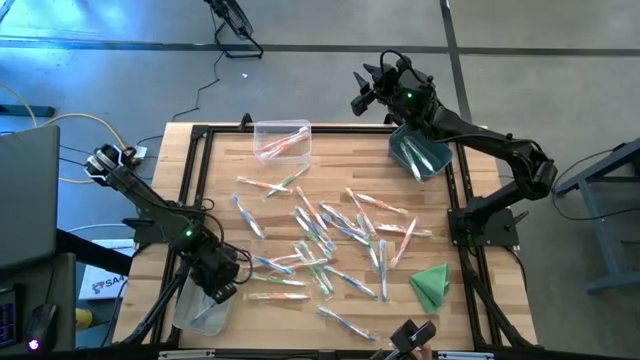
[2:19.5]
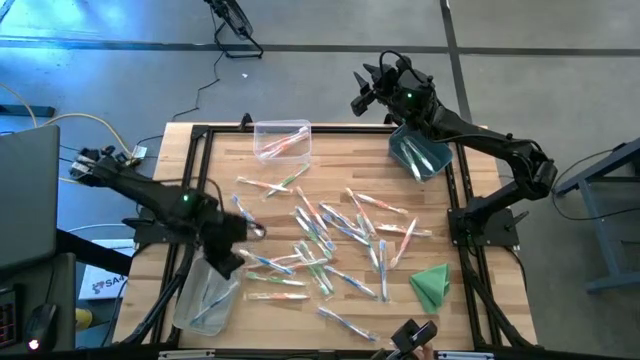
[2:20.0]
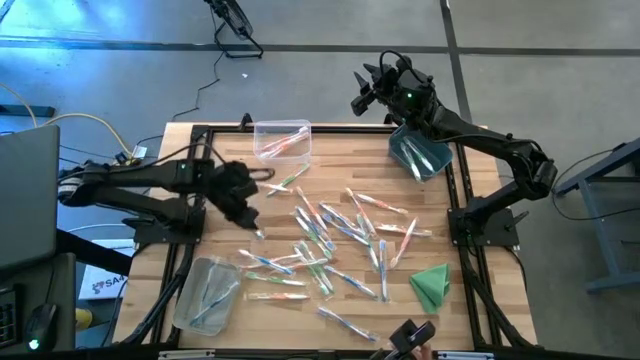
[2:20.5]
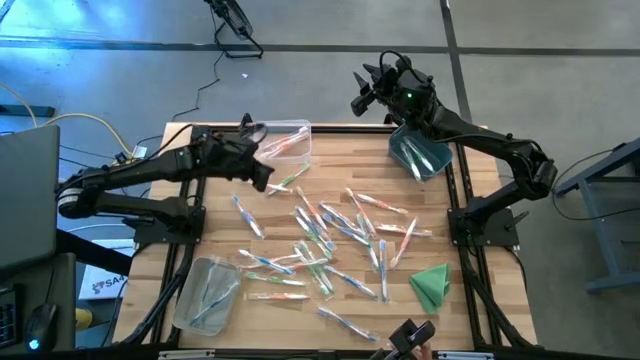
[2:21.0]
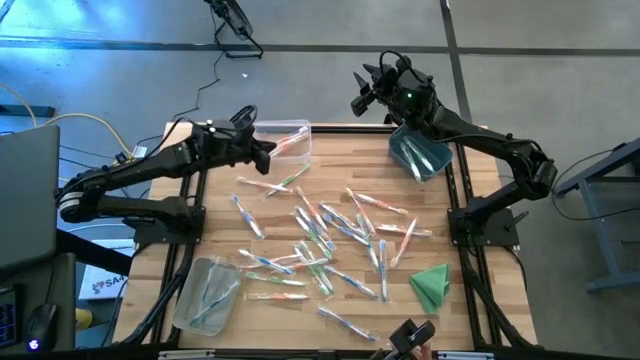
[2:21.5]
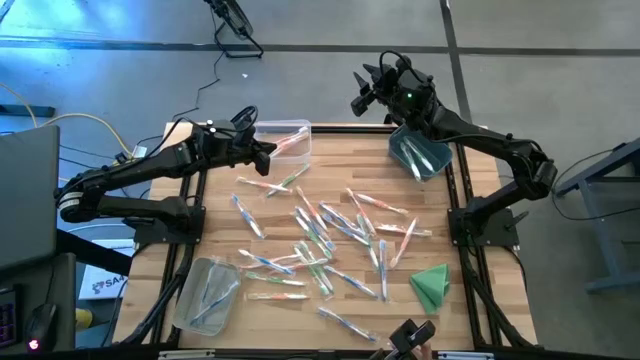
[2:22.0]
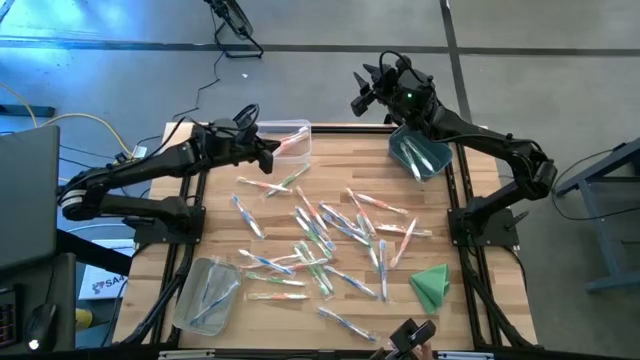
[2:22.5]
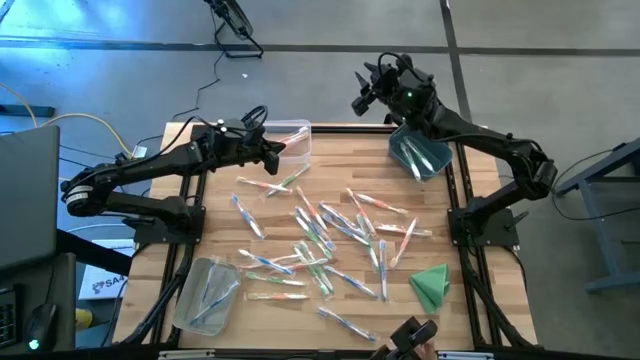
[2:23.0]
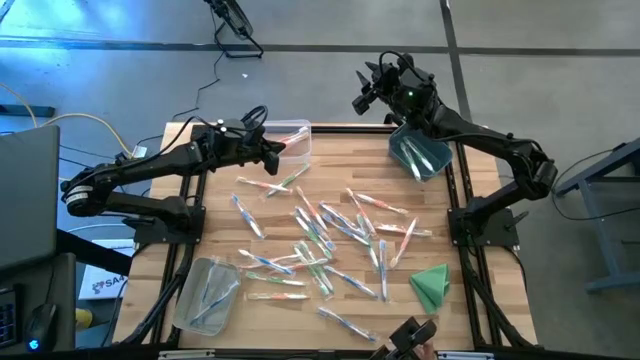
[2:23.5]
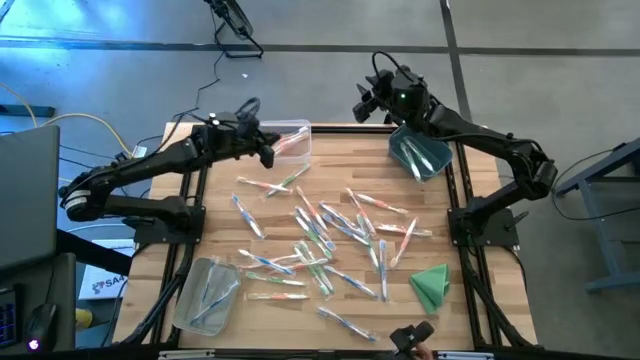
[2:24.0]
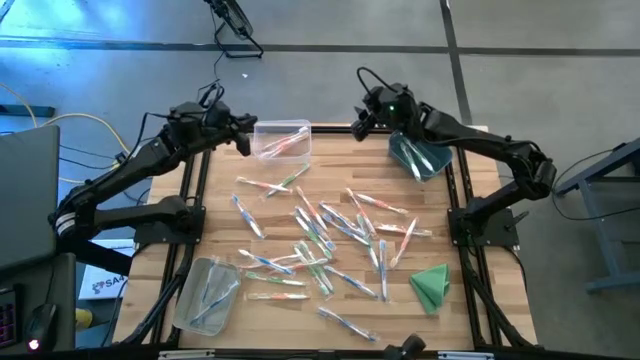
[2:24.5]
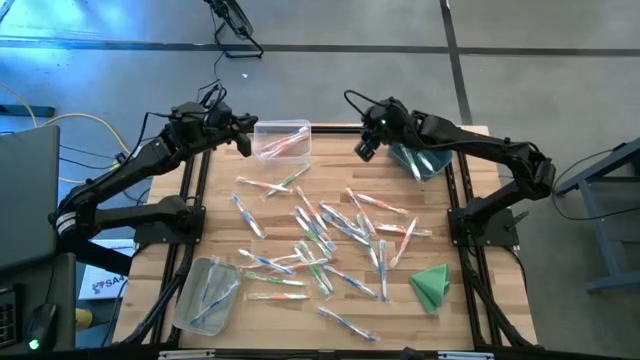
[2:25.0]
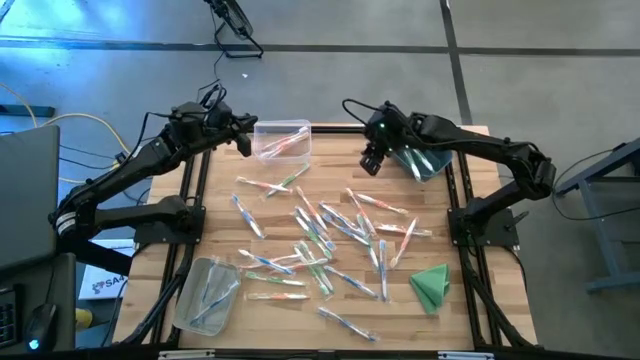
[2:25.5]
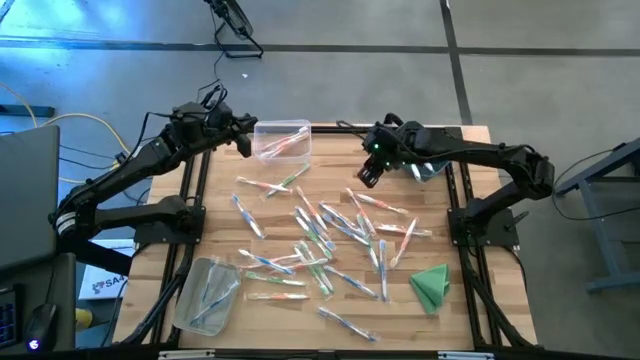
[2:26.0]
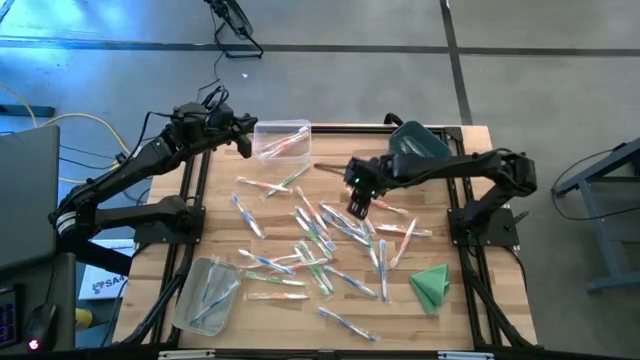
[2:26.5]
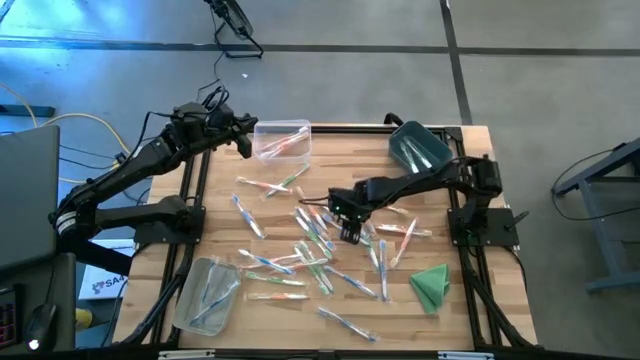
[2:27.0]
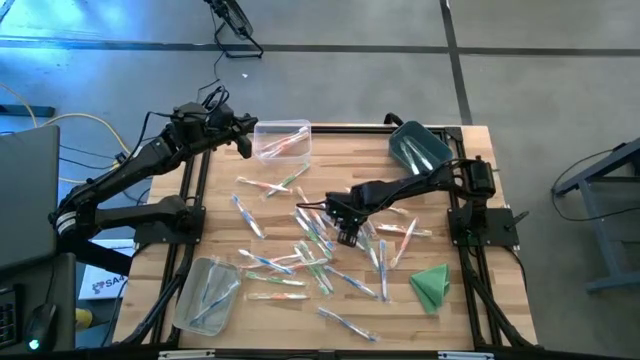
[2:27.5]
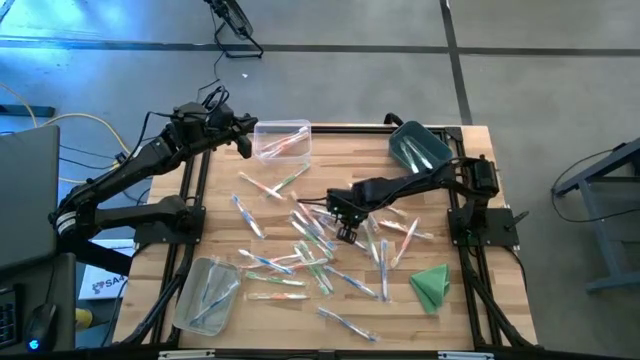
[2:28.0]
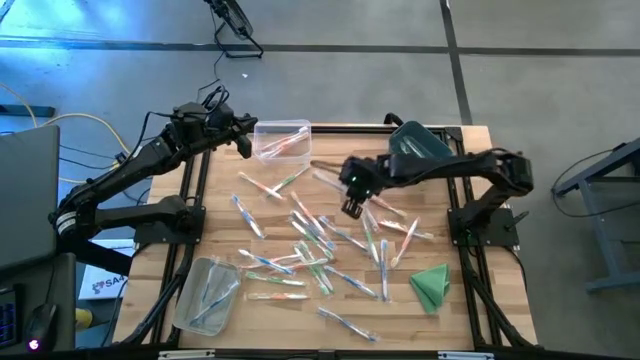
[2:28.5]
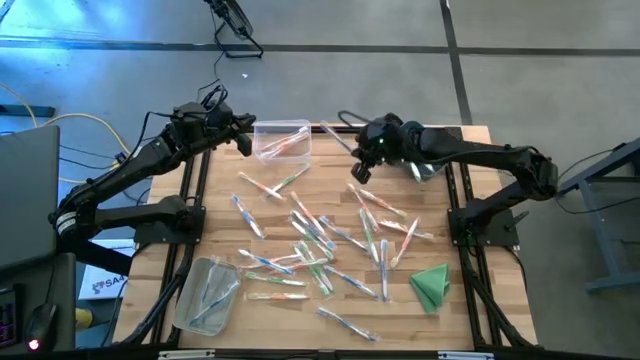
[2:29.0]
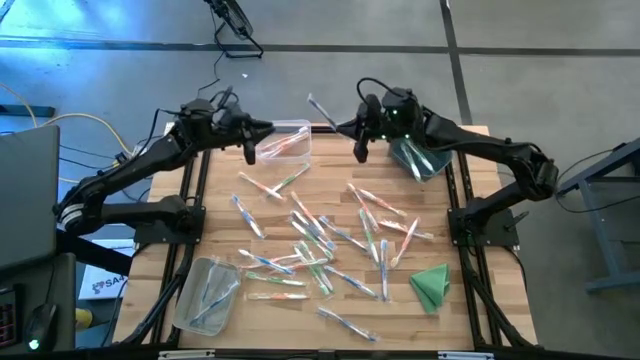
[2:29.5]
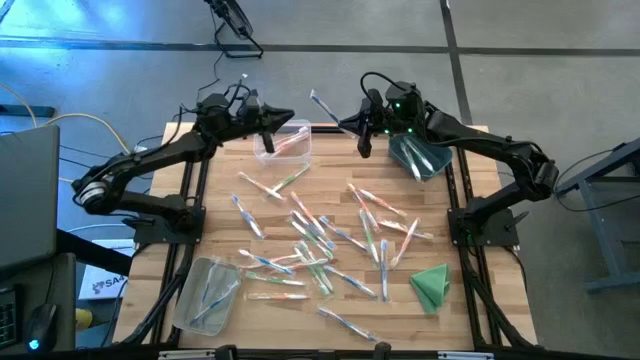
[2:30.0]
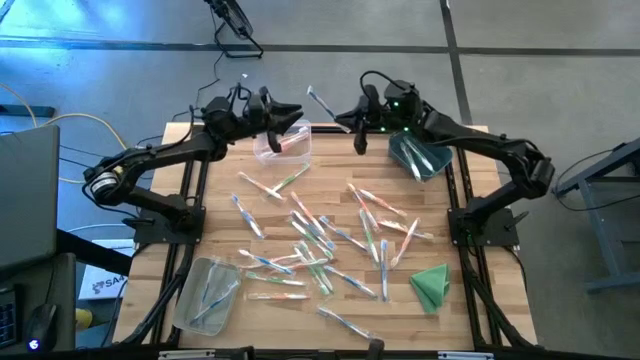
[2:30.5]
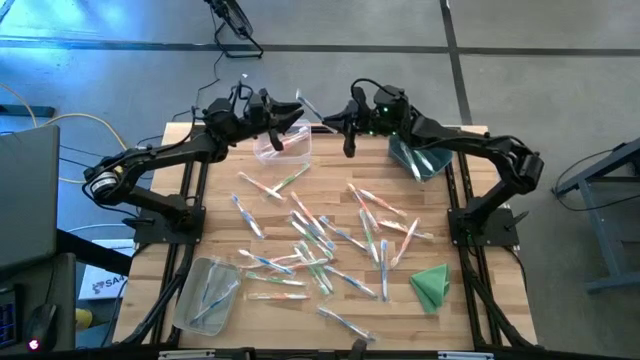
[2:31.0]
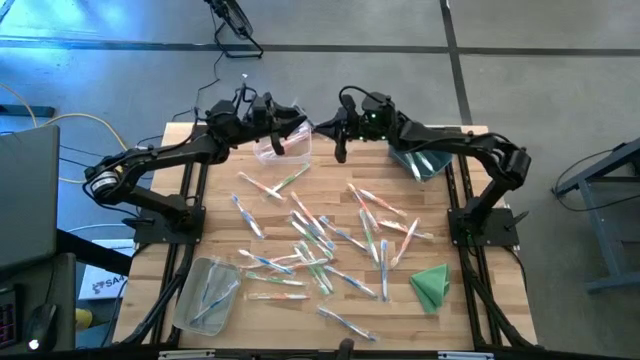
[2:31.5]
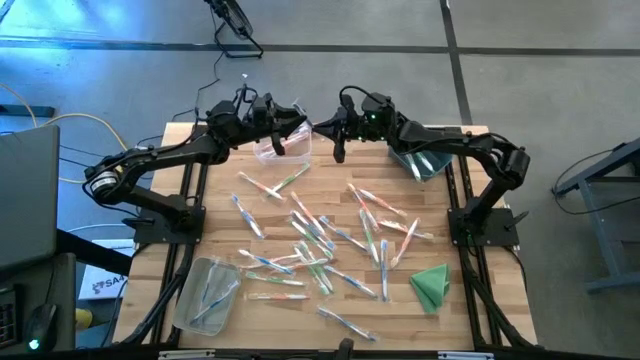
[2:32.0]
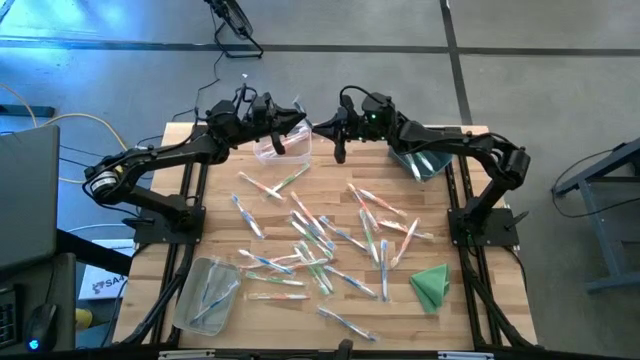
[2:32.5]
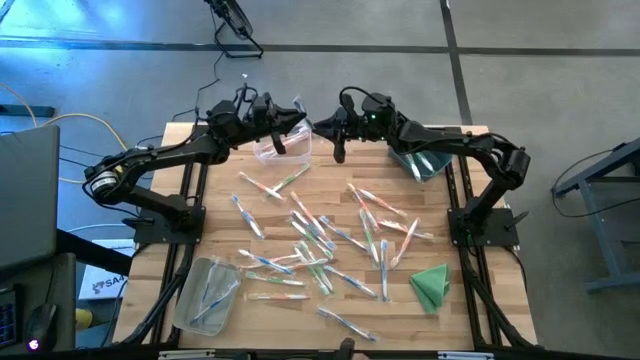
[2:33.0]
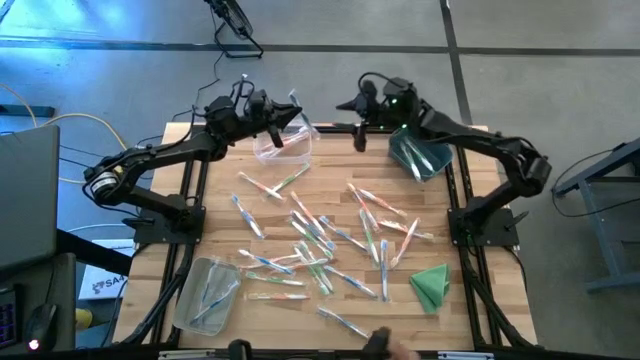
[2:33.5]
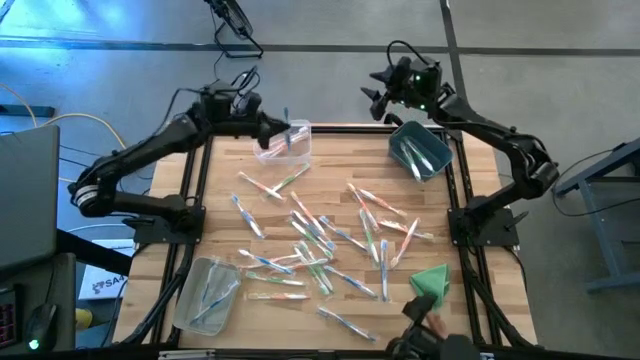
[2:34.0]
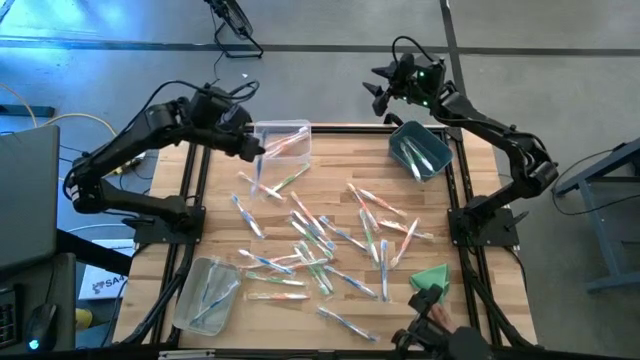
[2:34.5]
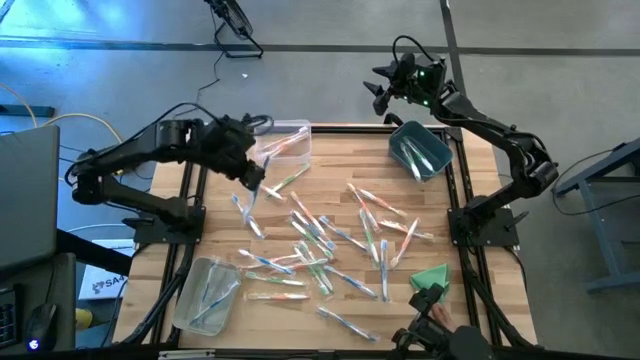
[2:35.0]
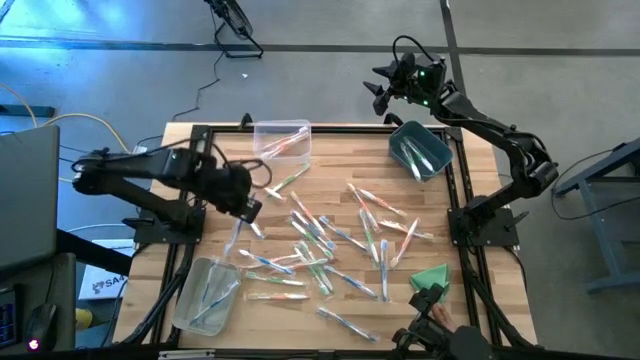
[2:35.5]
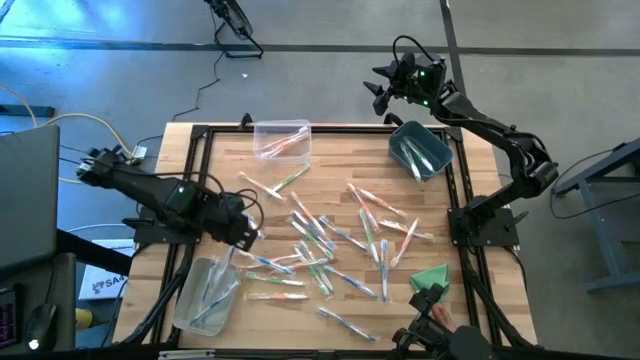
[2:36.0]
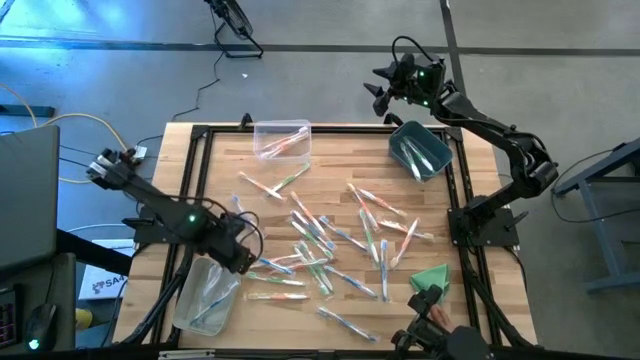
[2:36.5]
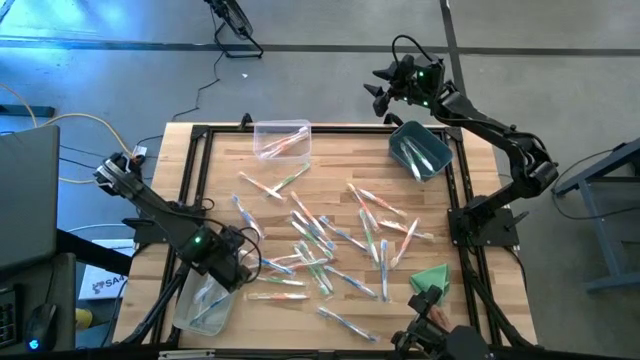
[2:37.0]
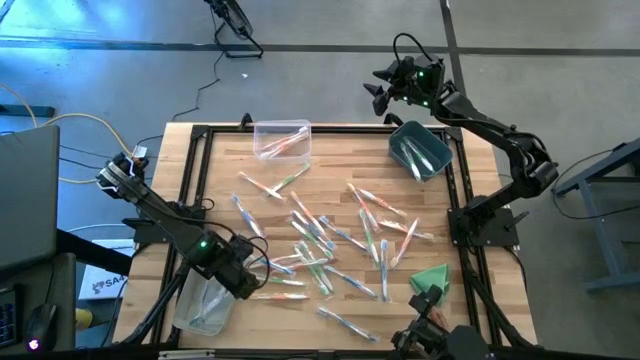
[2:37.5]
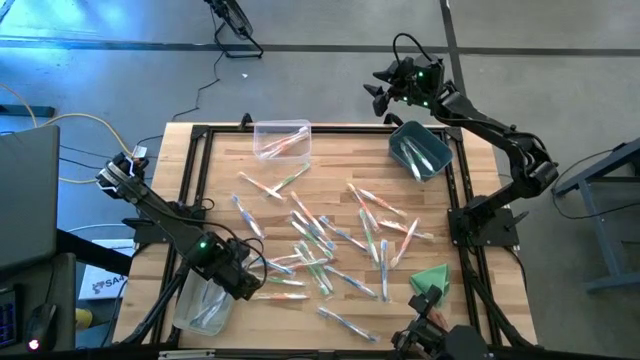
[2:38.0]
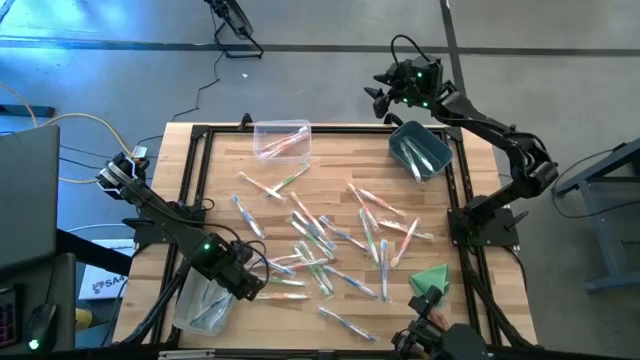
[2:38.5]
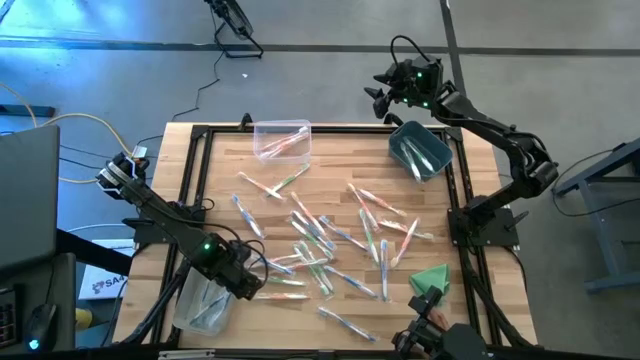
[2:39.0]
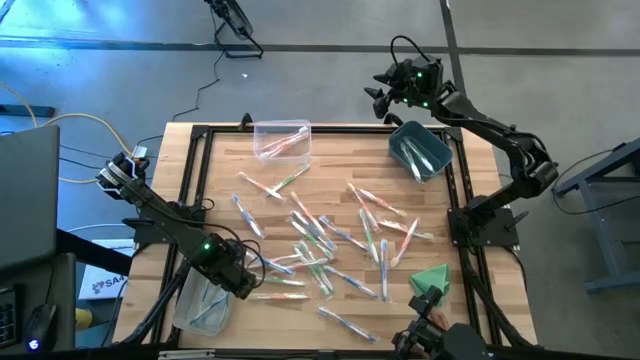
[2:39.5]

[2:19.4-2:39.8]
Task: Pick & Place Toothbrushes
Put the blue toothbrush into the gray bin
